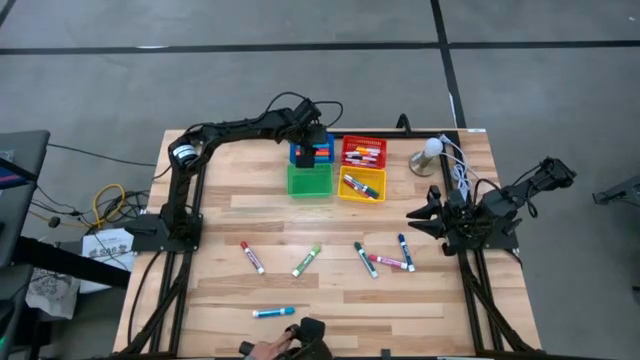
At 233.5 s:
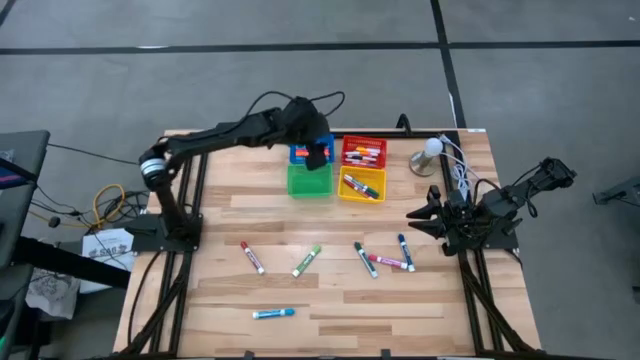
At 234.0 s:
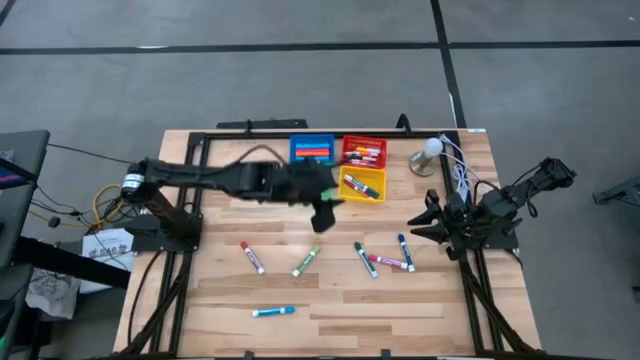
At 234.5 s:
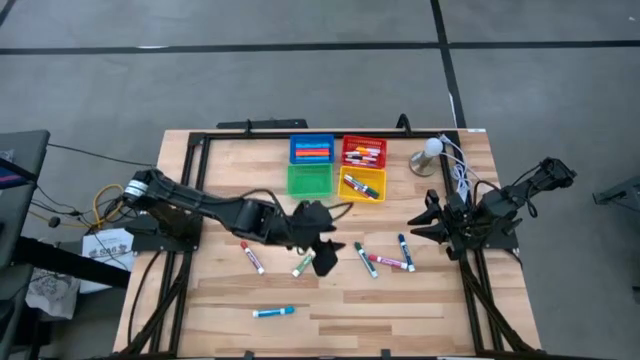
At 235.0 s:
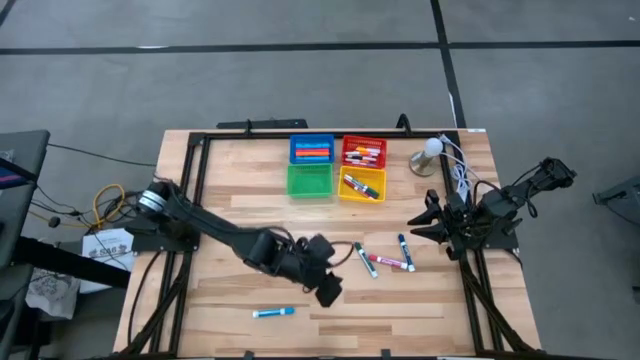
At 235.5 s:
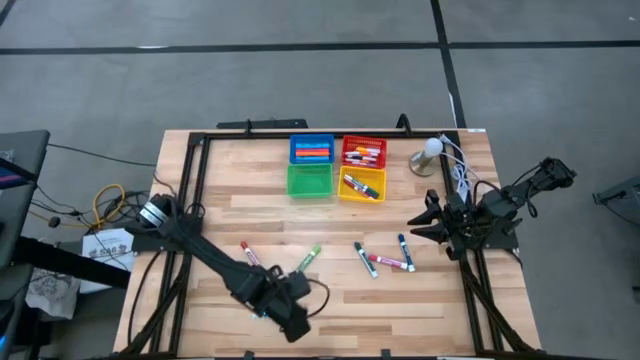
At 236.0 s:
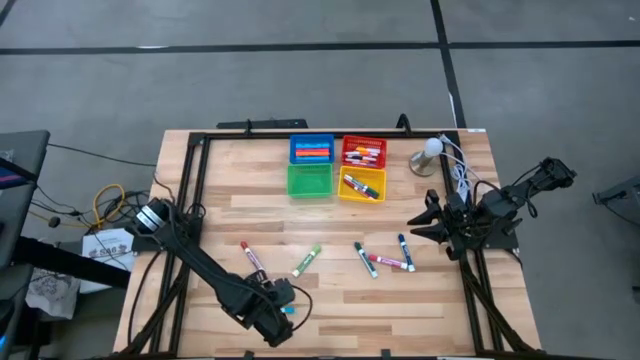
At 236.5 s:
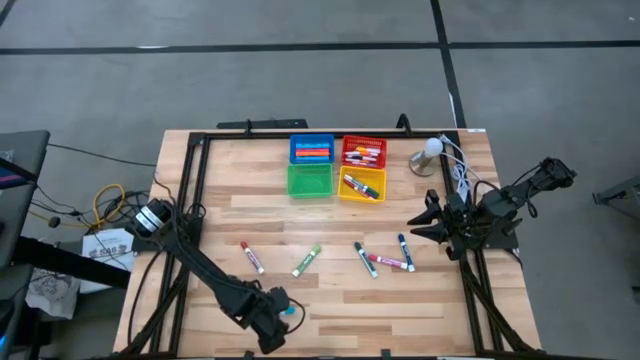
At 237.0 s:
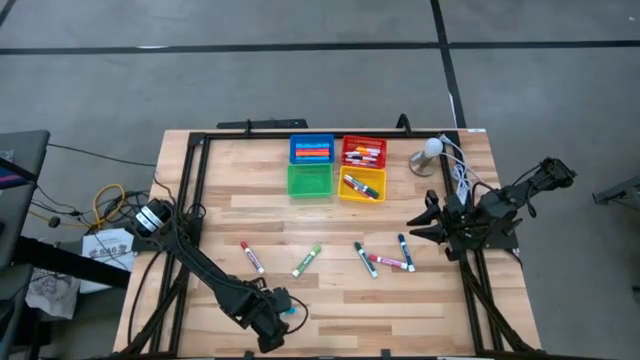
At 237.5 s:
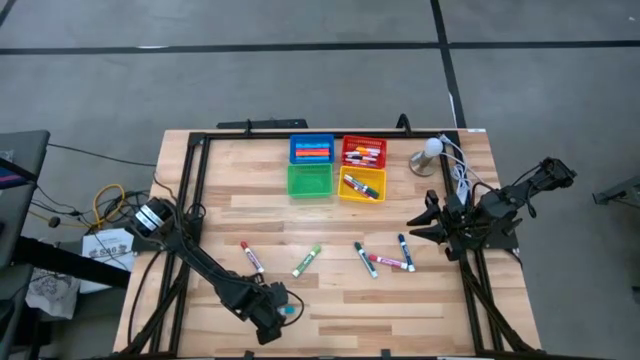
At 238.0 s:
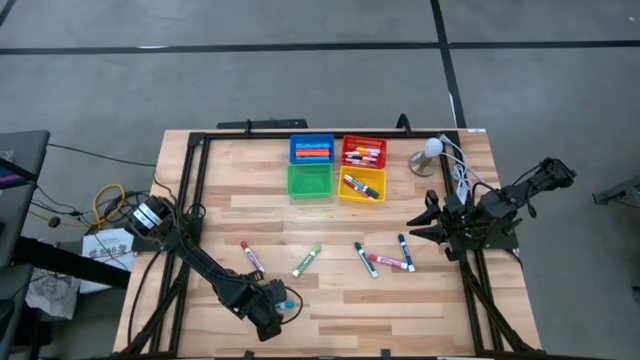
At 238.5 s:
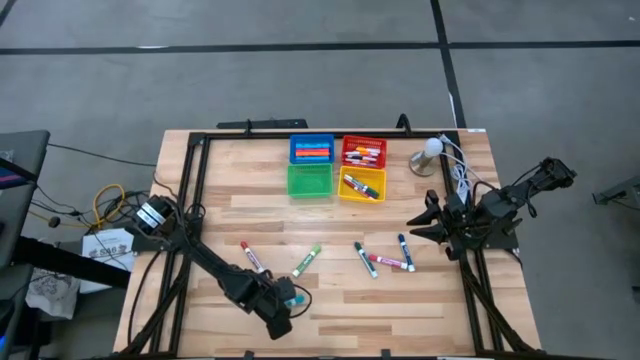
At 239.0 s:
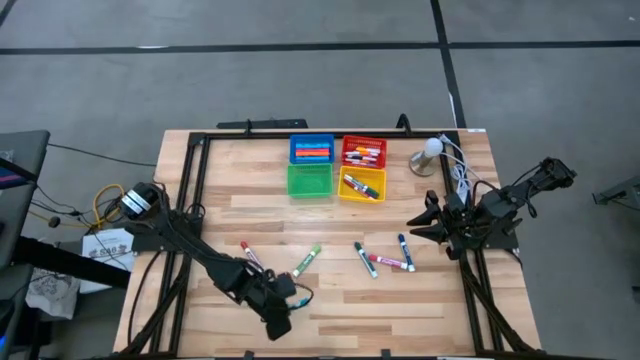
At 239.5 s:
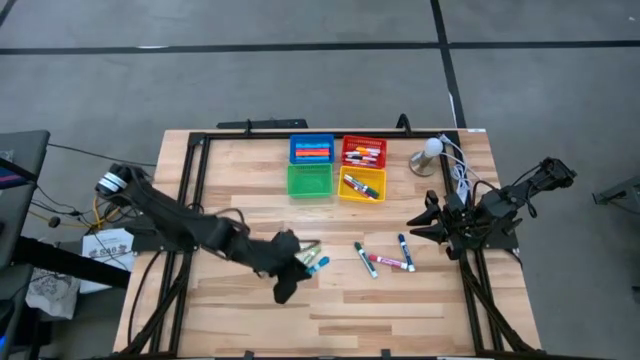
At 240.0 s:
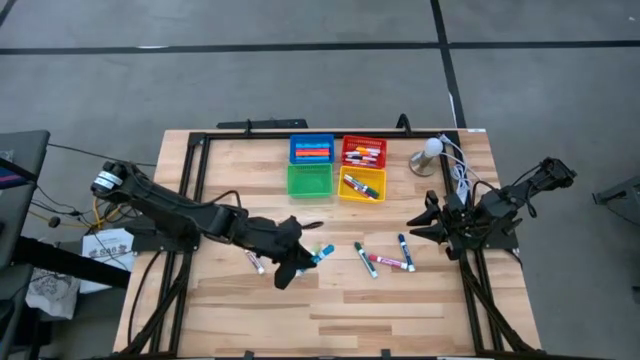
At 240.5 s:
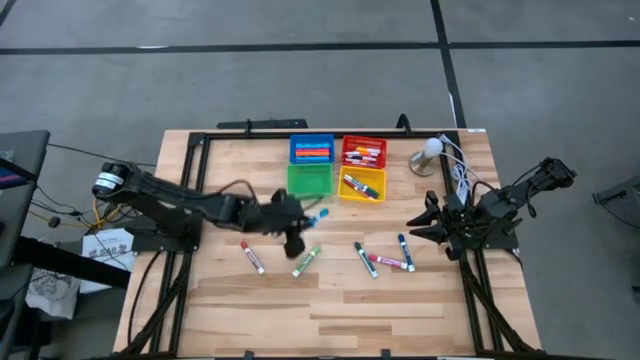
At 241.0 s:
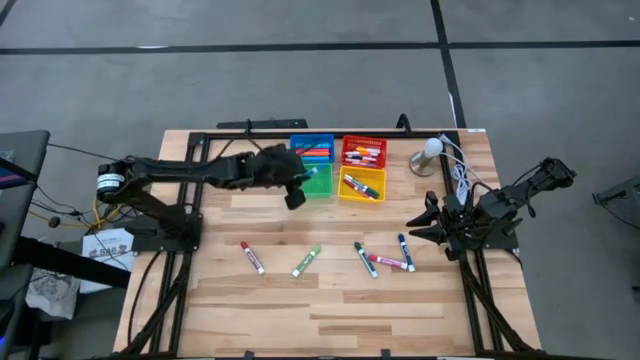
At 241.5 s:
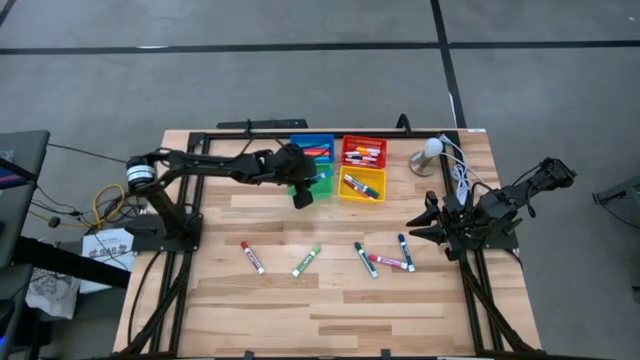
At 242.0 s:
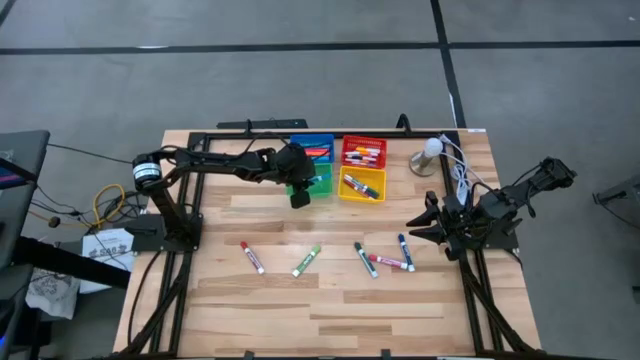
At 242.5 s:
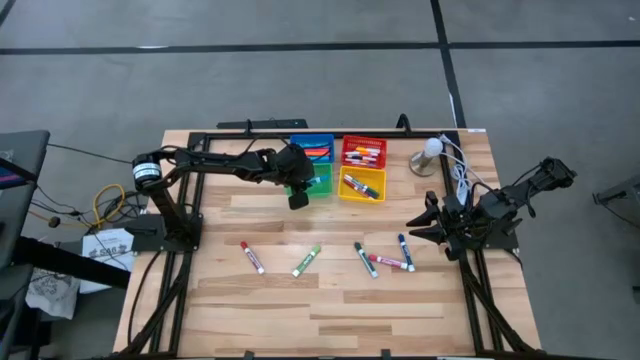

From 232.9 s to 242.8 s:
Task: Pick & Place Markers
Put the light blue marker into the green bin

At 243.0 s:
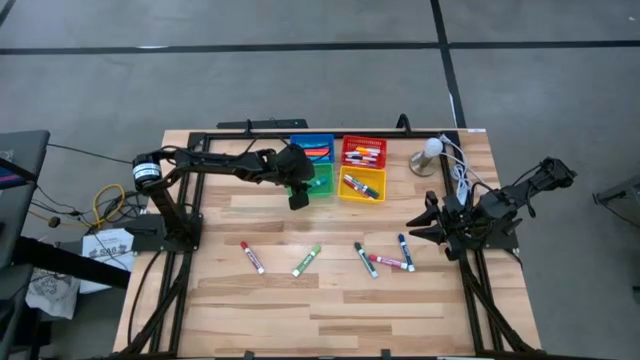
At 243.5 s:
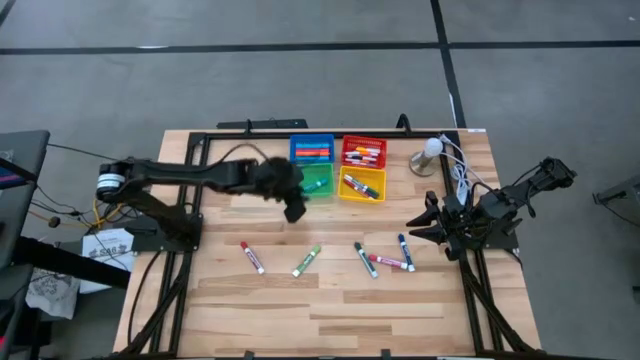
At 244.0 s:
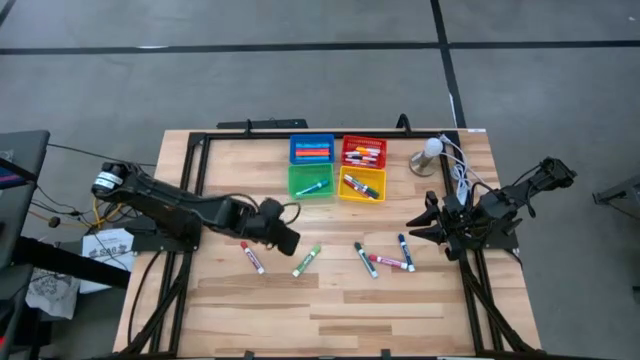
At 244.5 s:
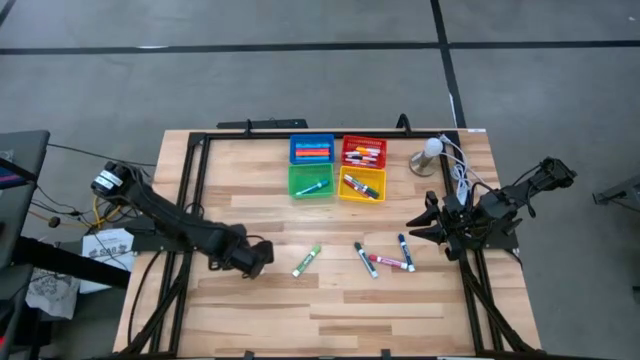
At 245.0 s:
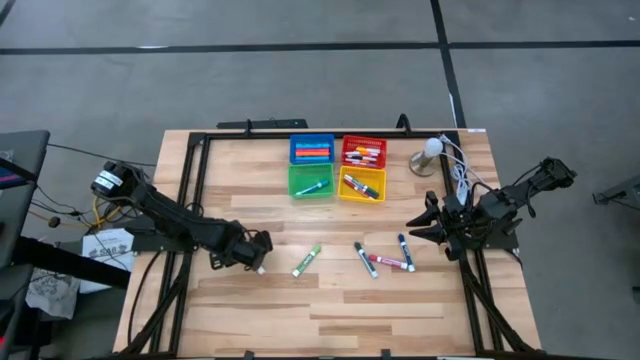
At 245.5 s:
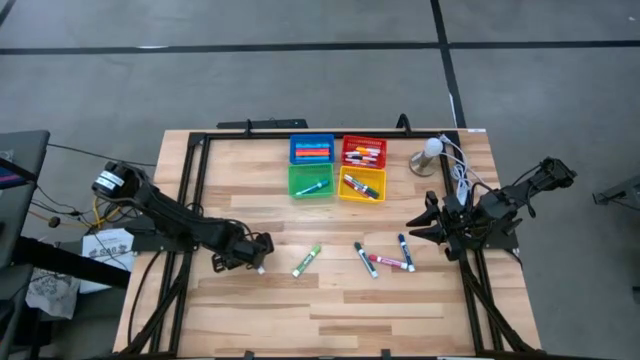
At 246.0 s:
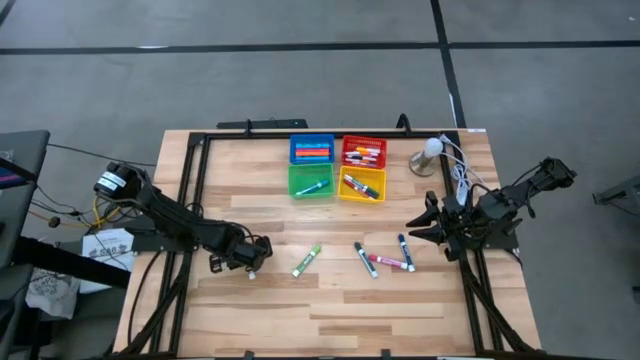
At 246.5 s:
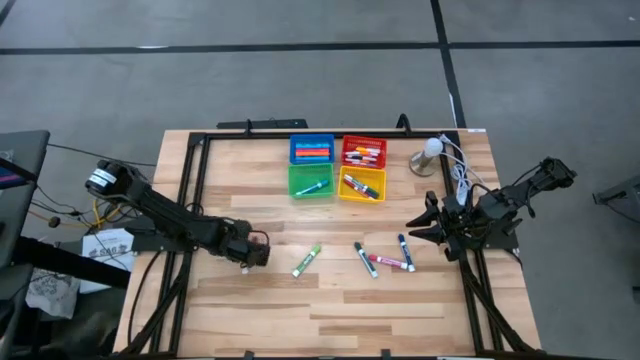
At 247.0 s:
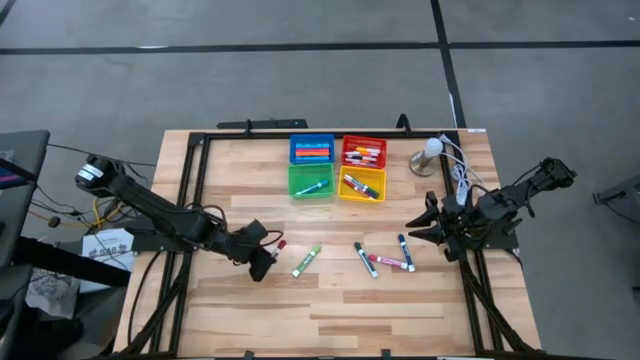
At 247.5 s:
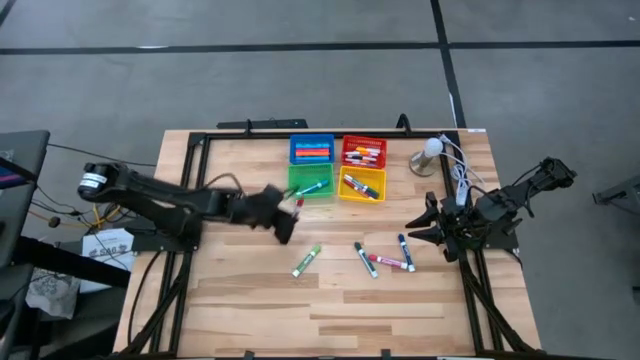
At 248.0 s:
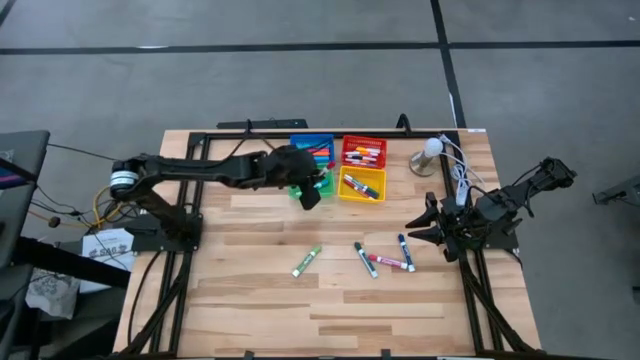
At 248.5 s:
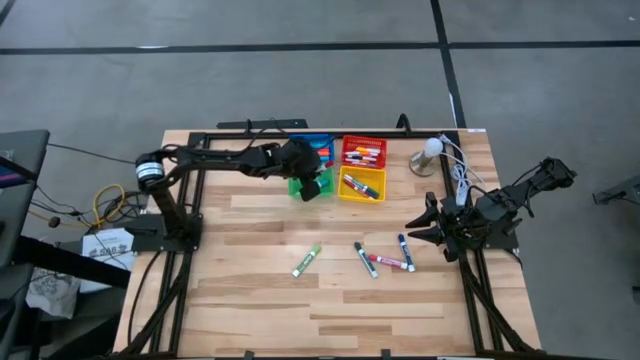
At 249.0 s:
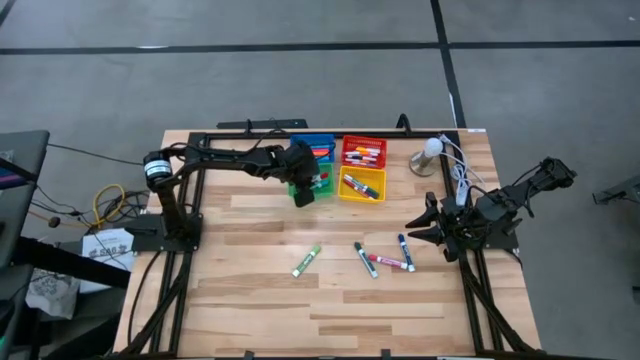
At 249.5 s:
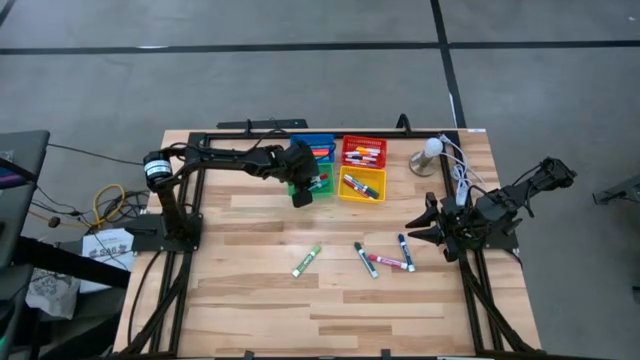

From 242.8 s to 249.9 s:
Put the red marker into the green bin

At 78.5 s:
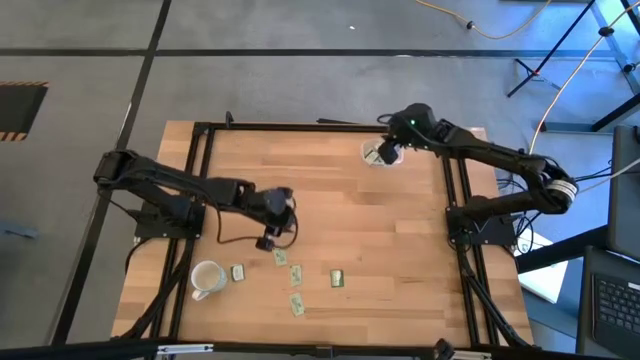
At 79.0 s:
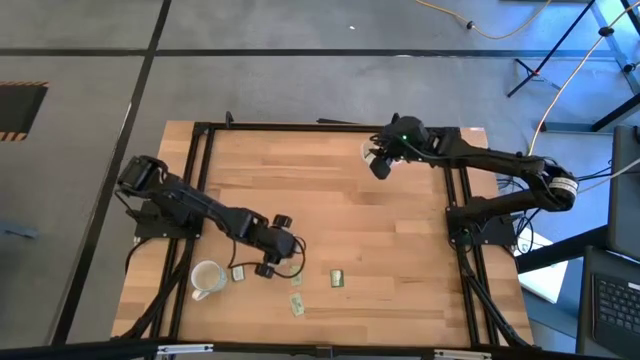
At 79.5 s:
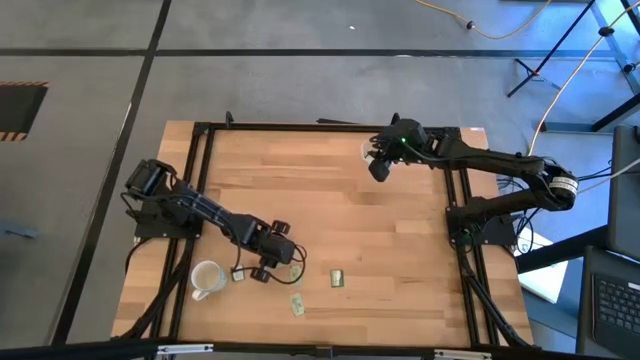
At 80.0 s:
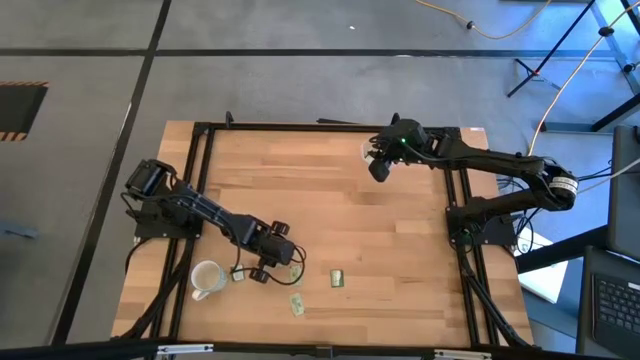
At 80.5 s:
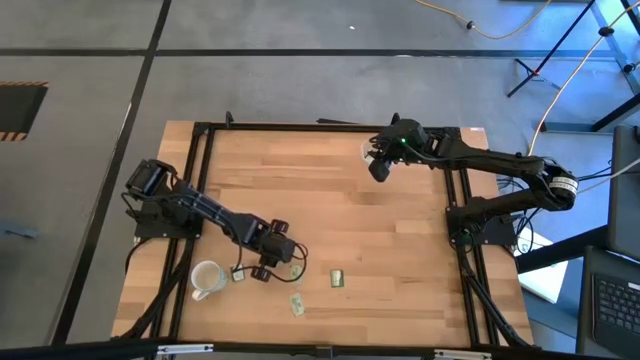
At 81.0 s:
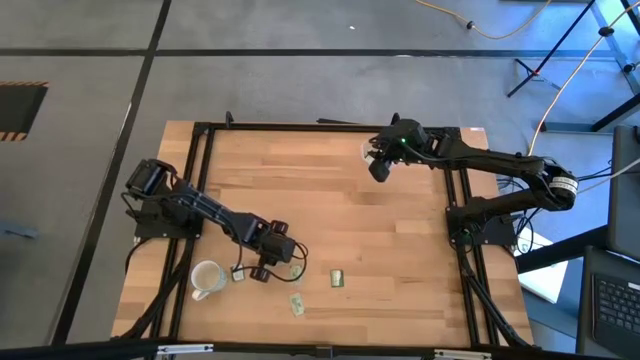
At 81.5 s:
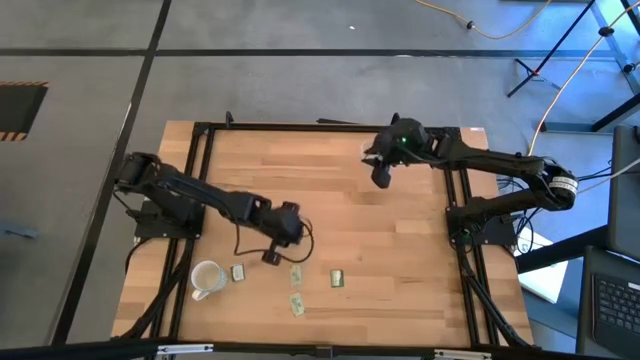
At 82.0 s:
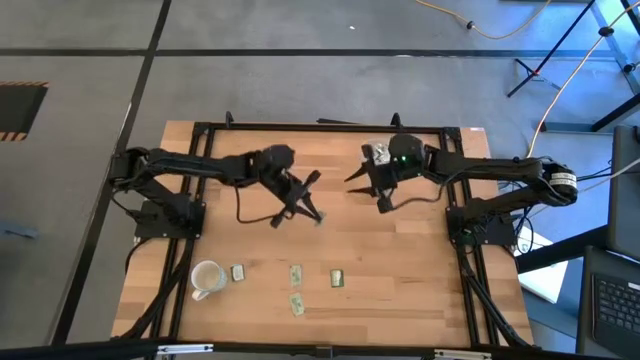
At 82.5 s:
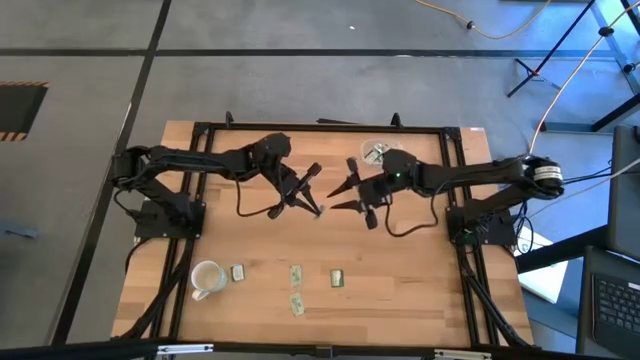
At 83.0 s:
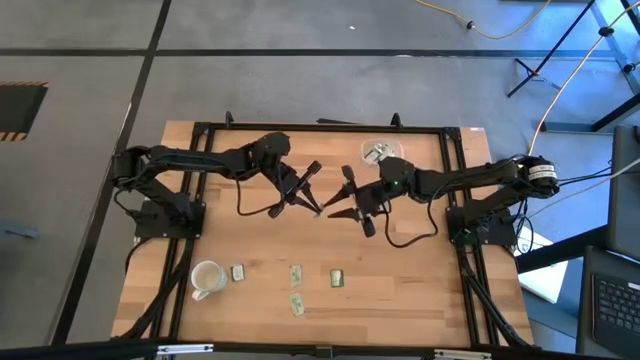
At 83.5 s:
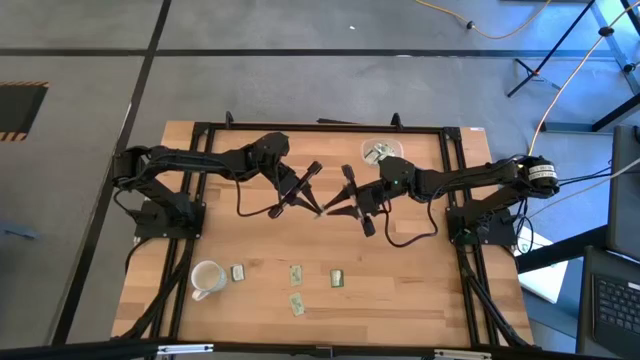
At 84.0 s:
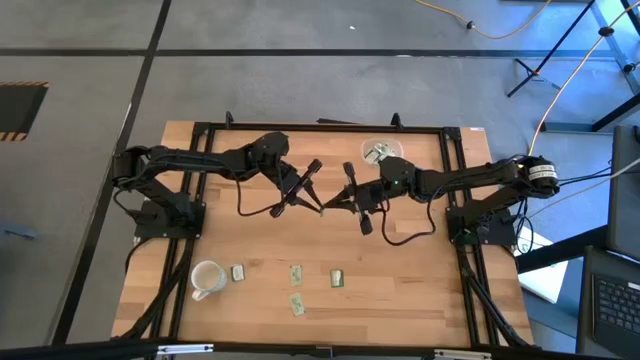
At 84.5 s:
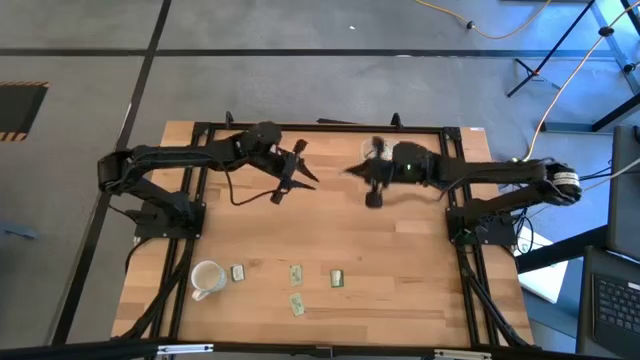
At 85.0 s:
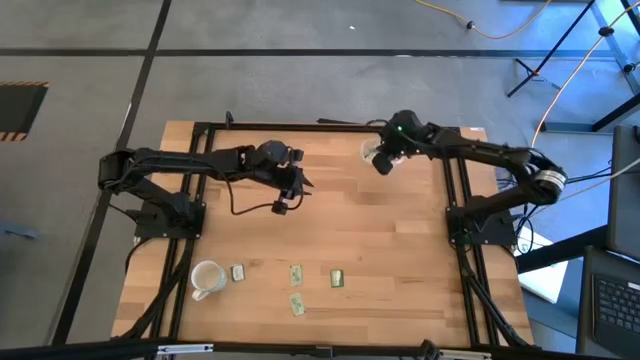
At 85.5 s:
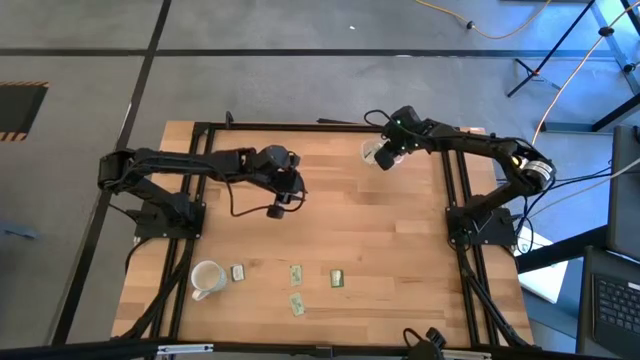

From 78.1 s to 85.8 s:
Task: Pick and place Stevia / Truvia into bins
Put the green stevia packet into the transparent container
